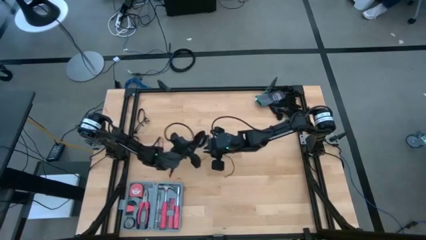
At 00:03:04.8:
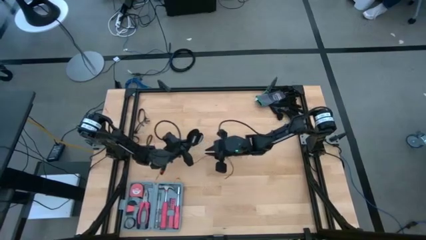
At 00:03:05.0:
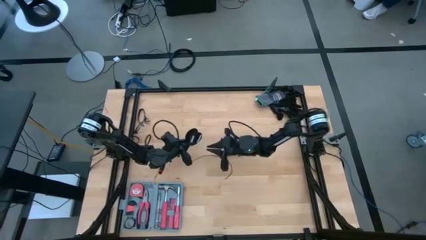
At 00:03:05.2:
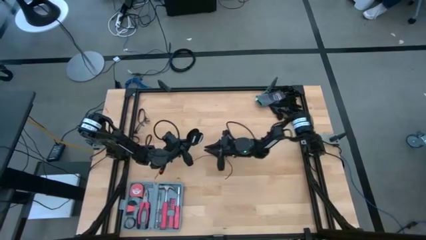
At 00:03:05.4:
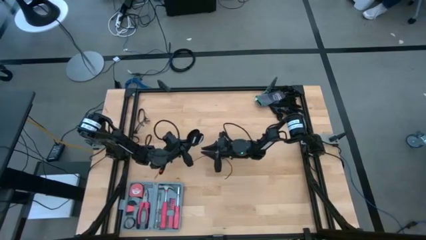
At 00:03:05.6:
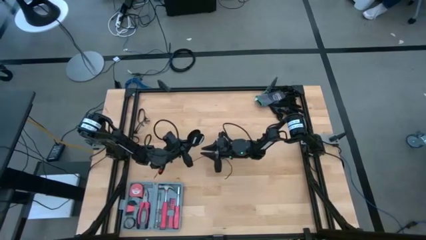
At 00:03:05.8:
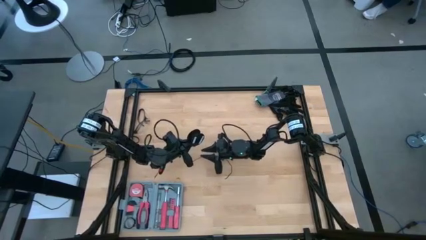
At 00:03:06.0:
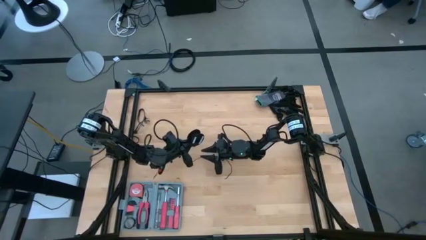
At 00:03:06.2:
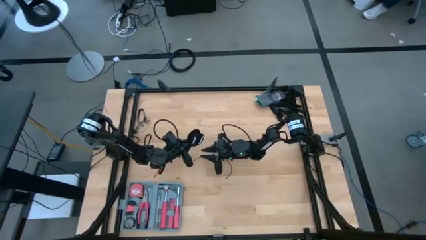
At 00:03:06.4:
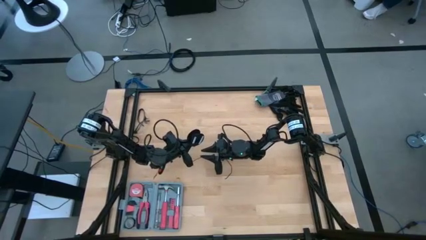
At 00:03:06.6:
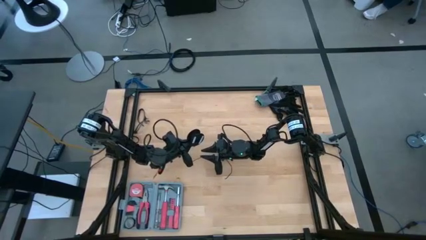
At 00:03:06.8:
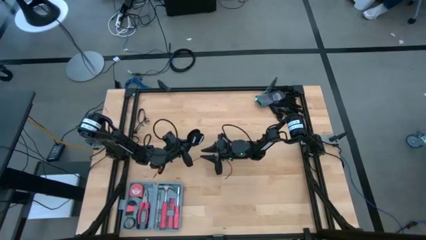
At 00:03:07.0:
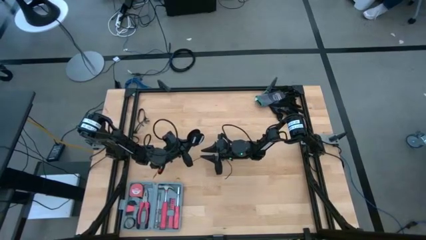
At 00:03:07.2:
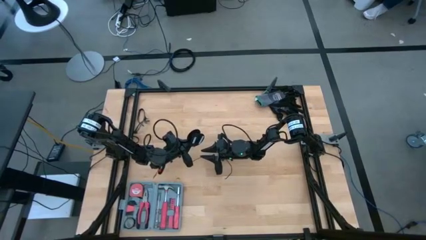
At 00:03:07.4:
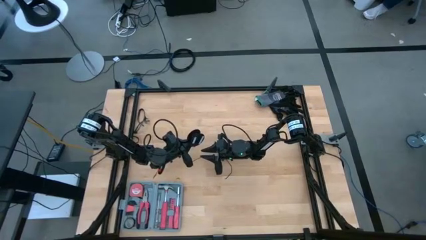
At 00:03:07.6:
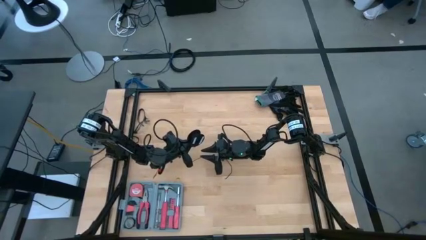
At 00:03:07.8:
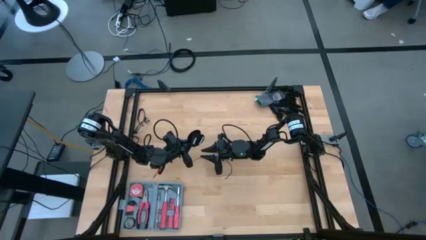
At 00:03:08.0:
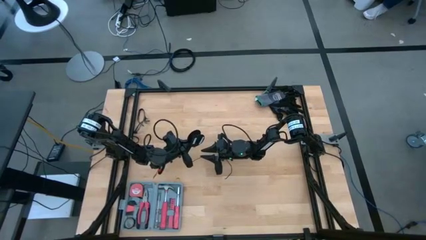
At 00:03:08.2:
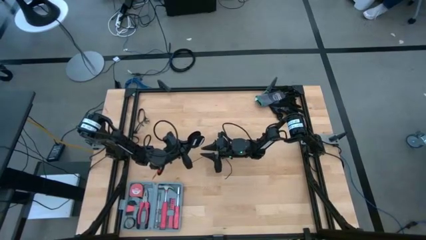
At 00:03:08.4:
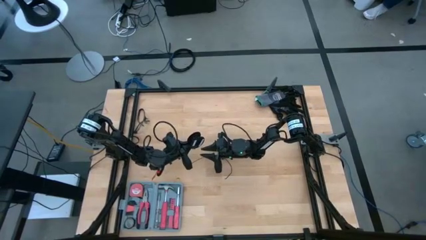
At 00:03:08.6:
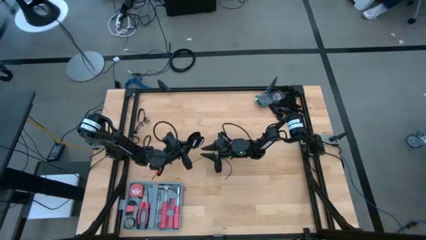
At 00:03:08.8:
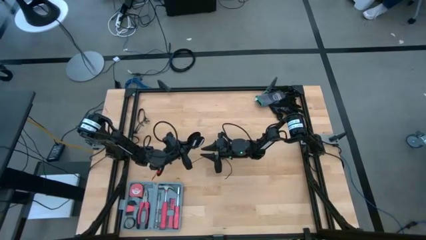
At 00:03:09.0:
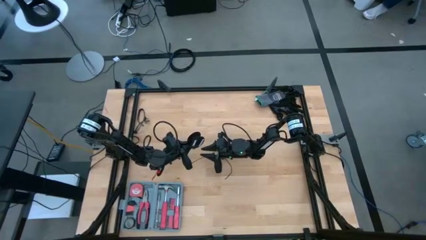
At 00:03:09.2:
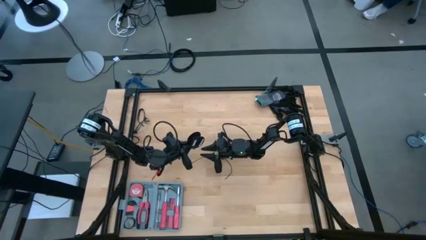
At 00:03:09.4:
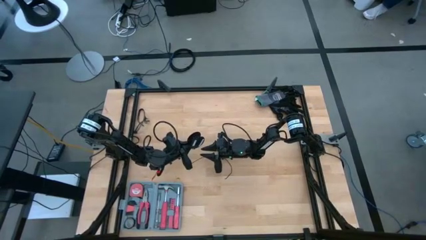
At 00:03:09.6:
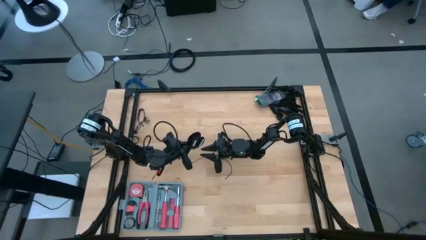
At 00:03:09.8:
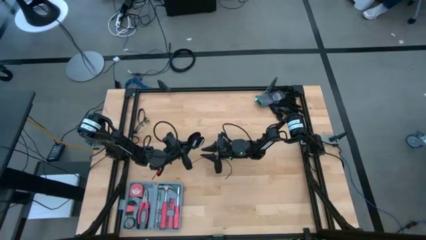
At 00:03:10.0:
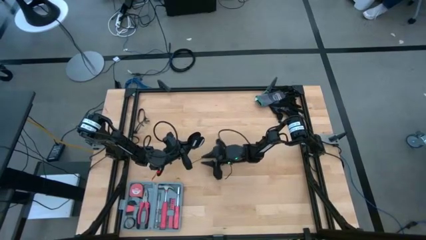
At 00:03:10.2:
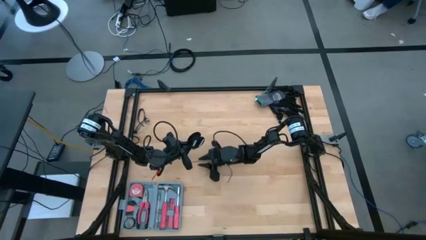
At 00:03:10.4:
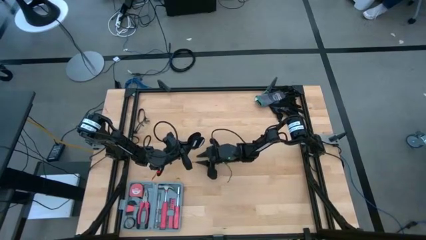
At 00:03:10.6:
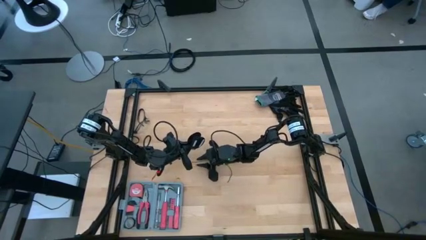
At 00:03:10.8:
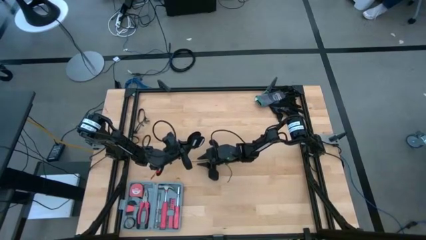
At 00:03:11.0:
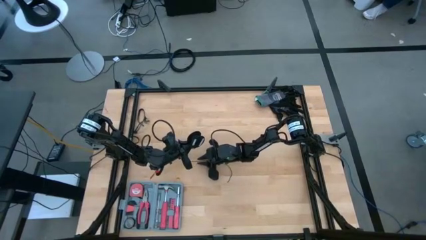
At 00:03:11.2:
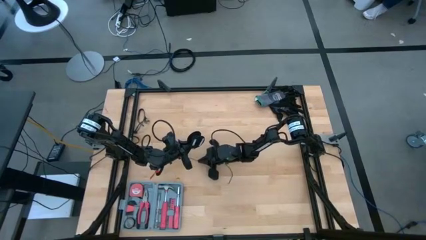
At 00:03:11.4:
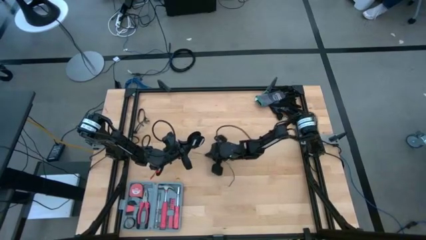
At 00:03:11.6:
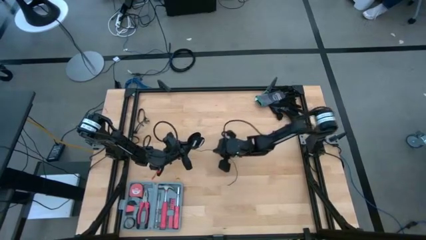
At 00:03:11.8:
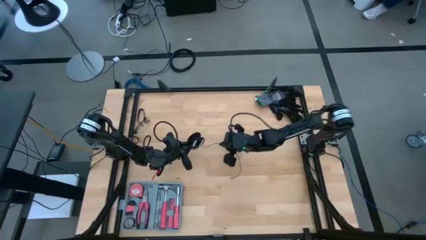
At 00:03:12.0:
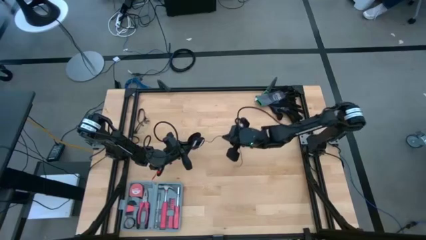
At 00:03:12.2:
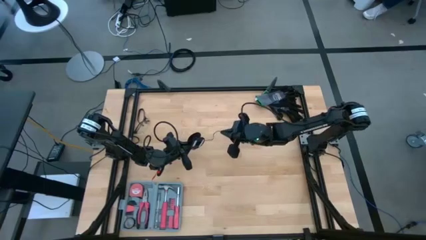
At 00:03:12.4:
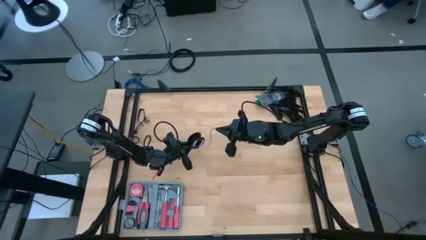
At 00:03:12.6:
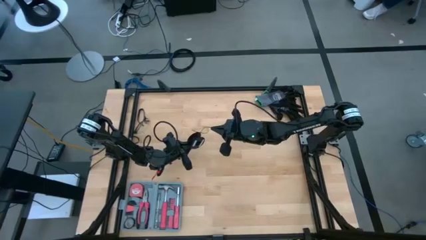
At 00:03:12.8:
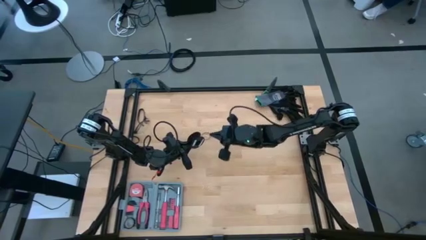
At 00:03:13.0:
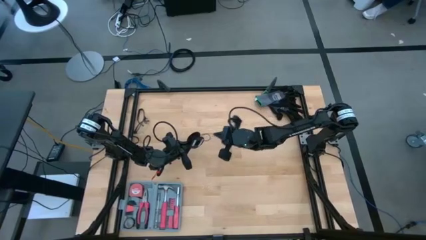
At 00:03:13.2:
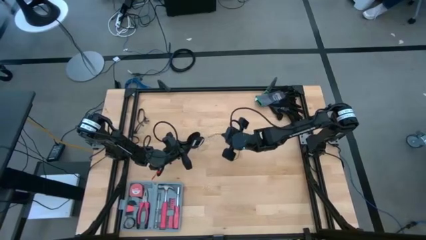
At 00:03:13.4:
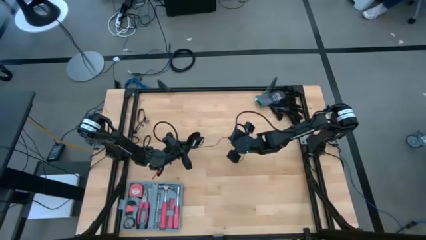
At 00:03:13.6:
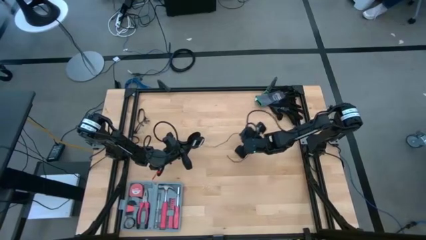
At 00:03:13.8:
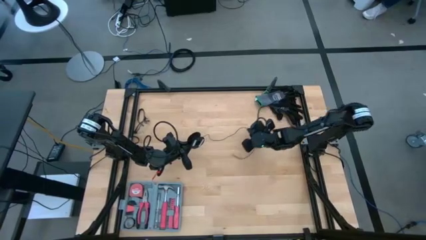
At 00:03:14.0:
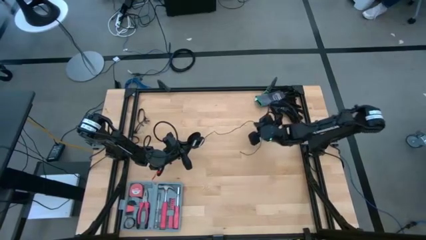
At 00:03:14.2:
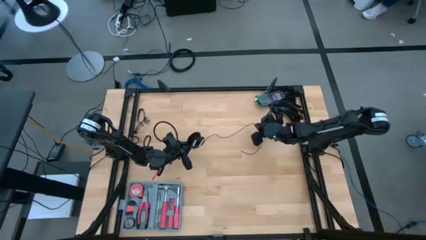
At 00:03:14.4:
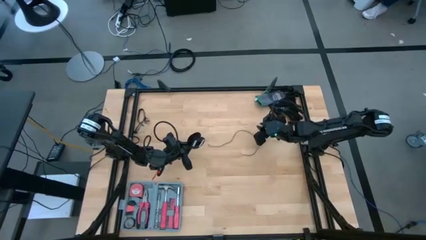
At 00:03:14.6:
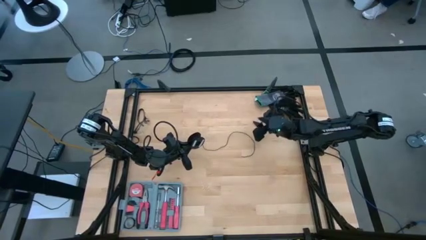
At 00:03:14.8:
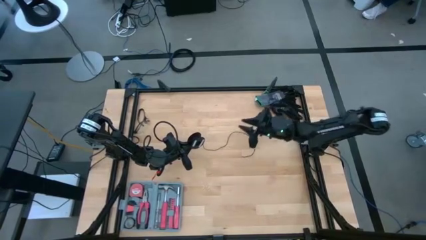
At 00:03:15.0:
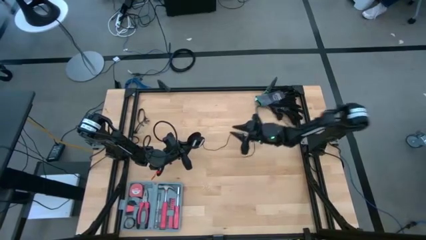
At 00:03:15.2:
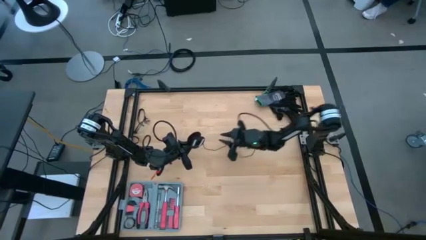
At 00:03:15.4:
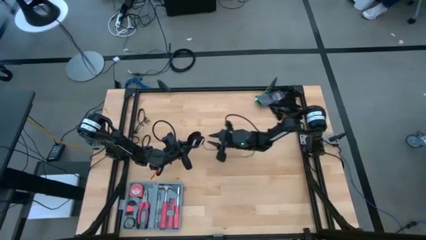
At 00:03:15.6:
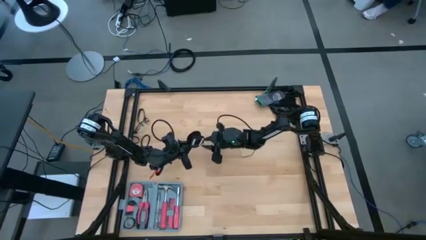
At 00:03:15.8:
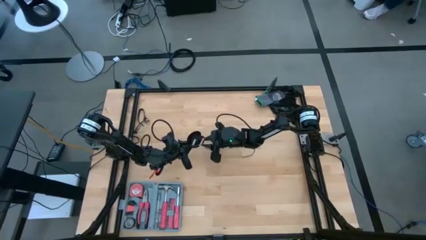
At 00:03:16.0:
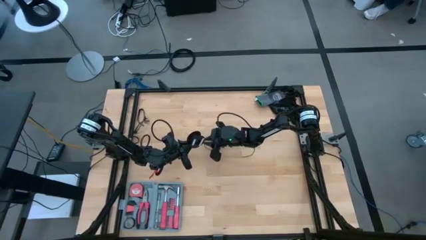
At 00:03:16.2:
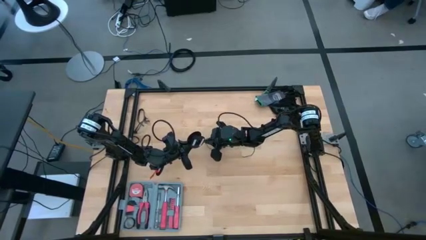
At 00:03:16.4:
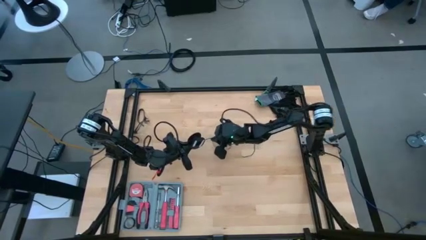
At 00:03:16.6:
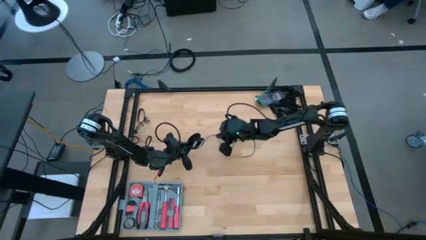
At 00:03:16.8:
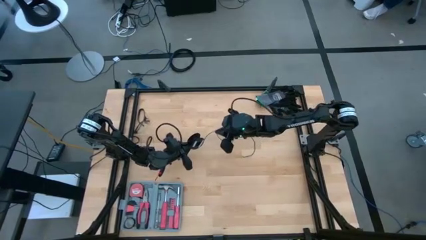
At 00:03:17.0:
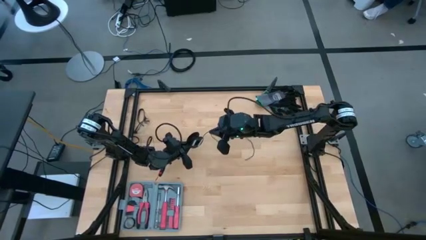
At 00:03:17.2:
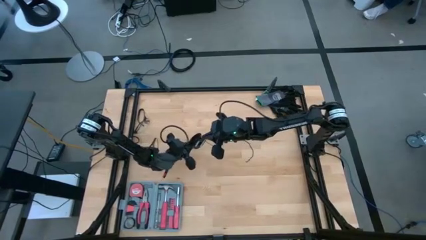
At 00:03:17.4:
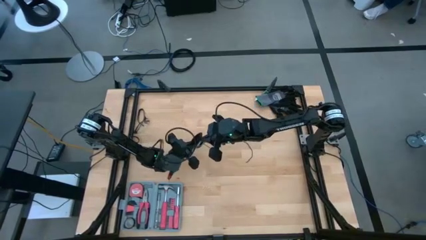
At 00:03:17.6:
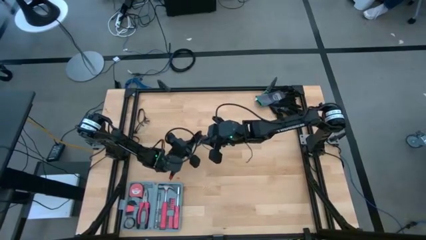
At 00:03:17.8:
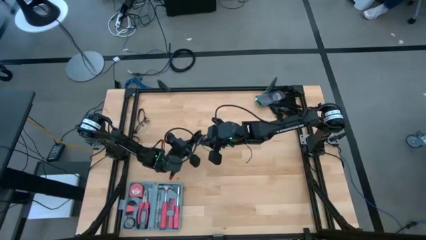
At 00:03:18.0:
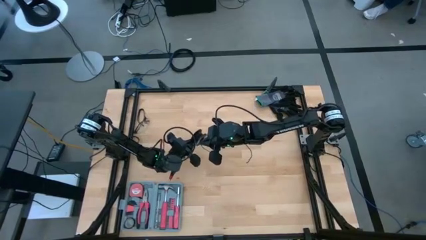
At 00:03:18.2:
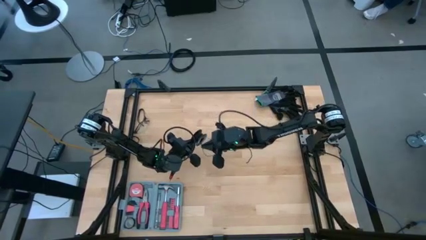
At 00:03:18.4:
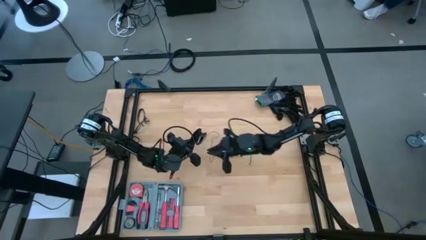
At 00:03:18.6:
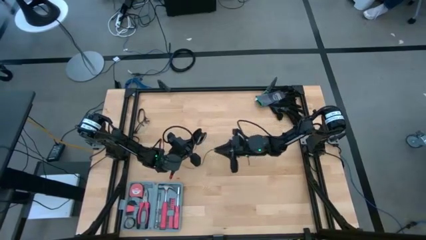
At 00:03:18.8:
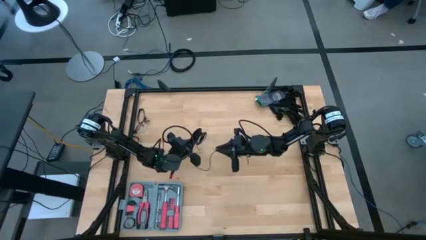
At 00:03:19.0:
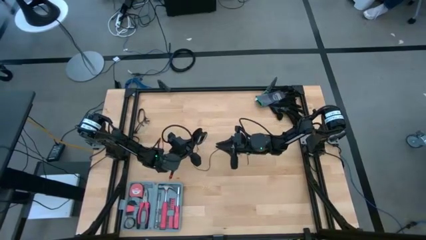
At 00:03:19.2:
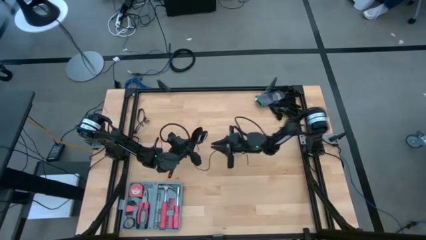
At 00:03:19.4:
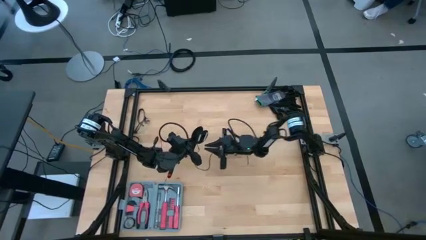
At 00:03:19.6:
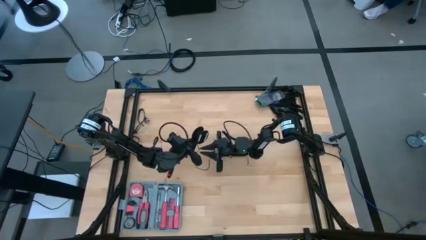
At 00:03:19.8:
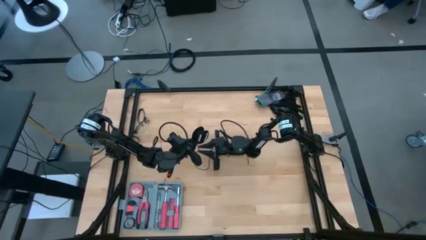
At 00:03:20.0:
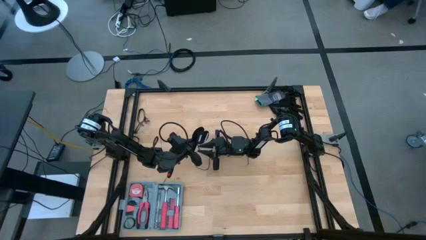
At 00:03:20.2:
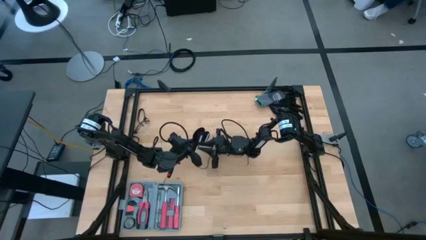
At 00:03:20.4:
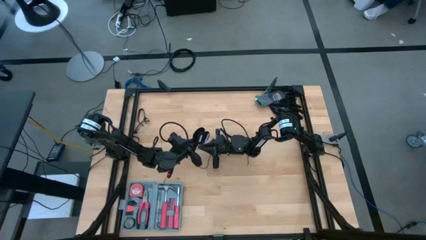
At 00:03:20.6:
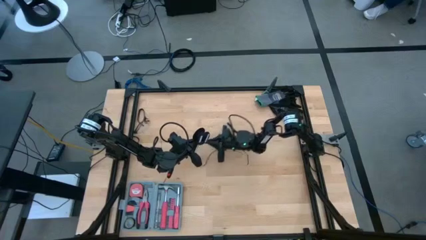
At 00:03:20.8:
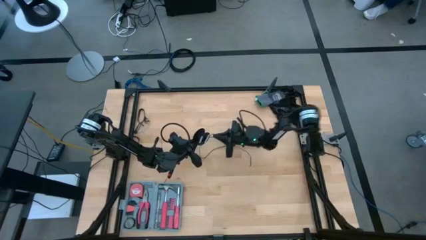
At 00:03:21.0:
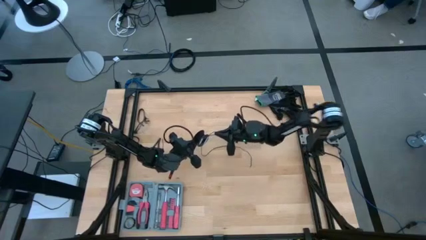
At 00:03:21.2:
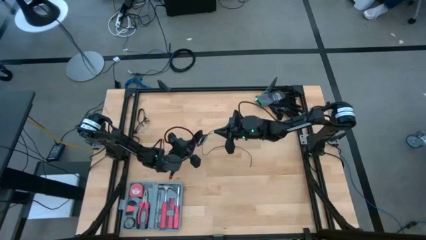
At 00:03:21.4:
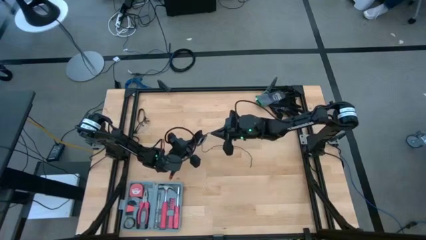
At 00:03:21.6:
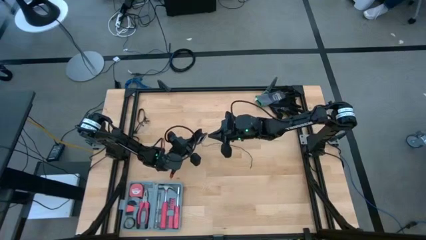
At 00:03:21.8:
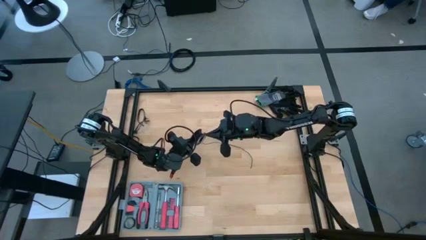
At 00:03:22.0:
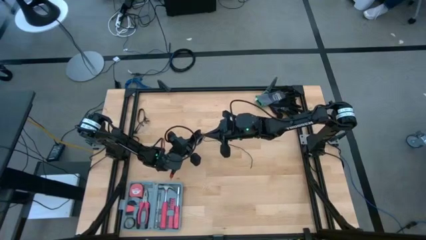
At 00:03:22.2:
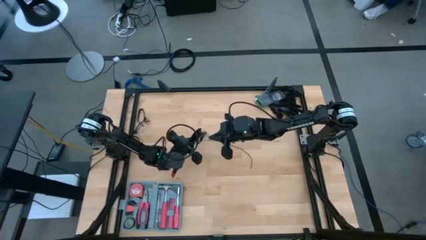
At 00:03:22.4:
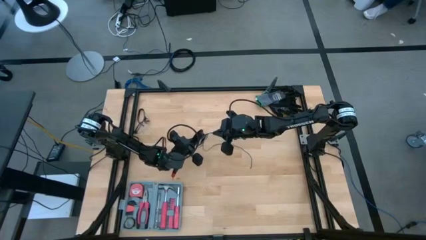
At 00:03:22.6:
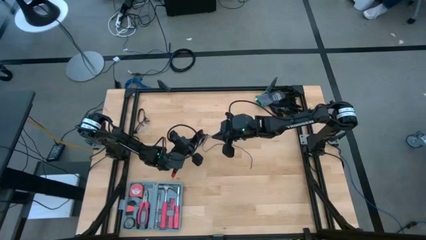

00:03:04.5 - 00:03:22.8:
Task: Coil cords
Coil the black wire onto the spool
